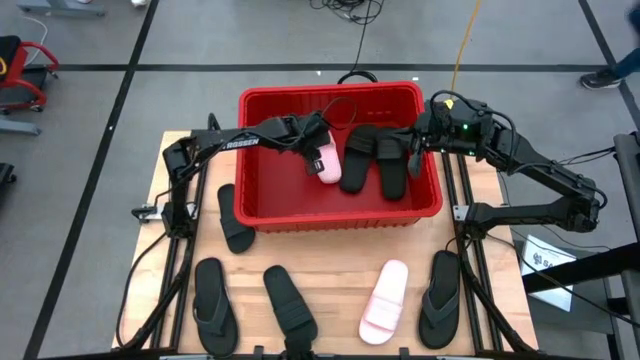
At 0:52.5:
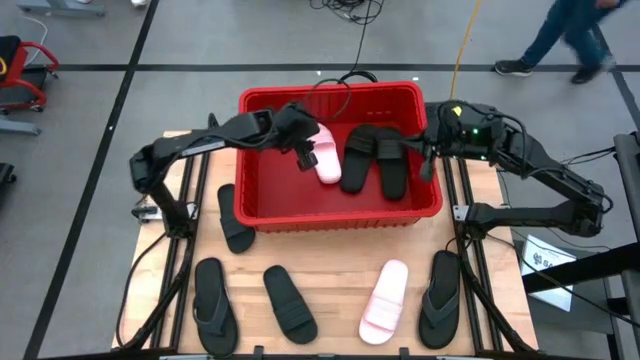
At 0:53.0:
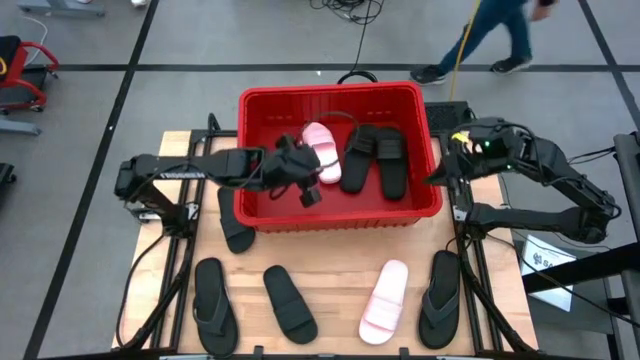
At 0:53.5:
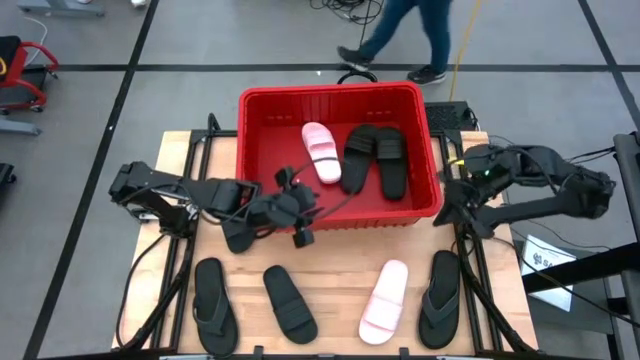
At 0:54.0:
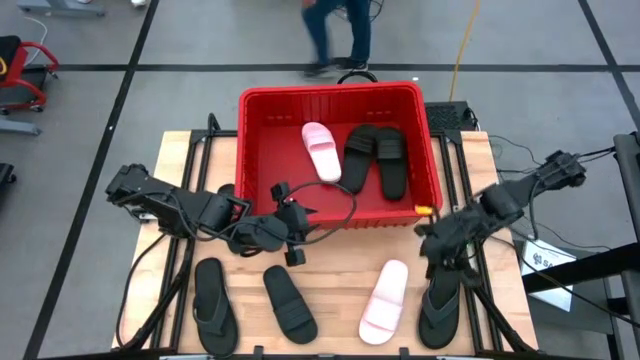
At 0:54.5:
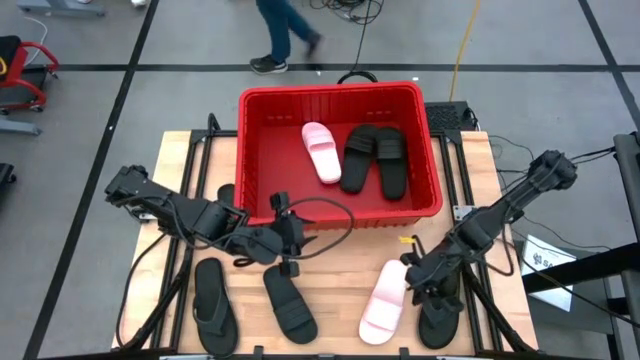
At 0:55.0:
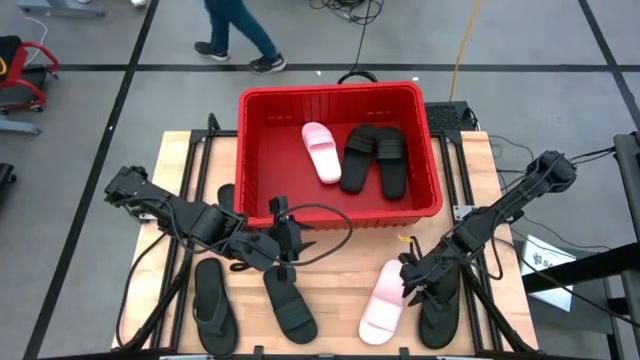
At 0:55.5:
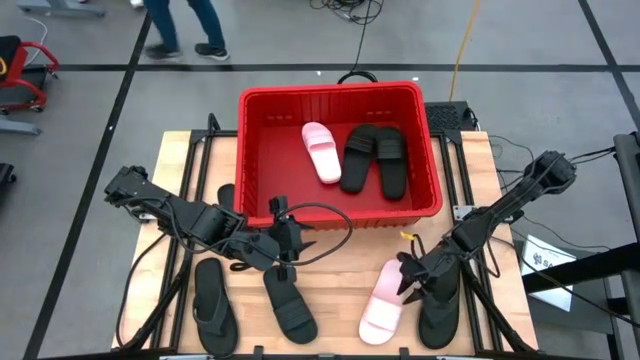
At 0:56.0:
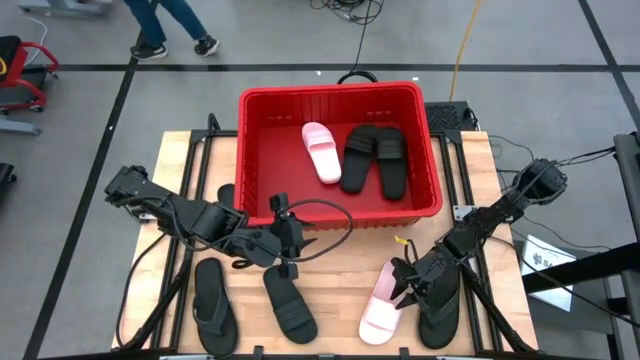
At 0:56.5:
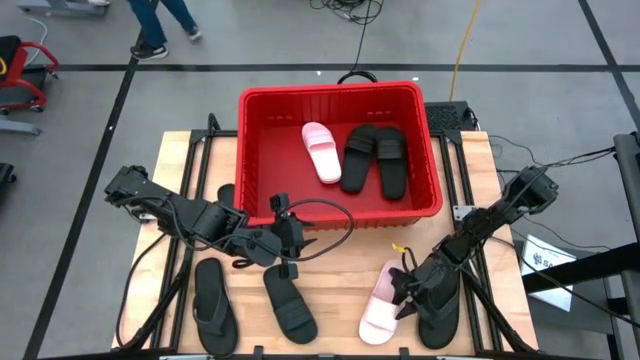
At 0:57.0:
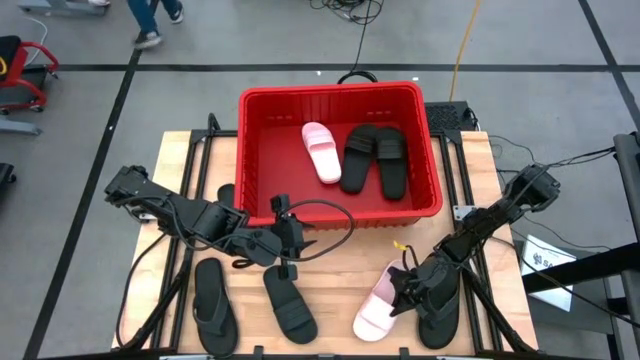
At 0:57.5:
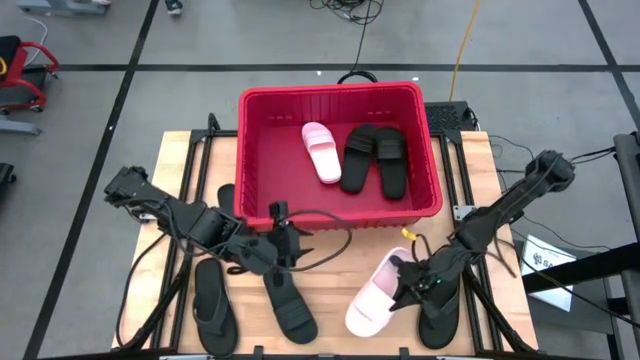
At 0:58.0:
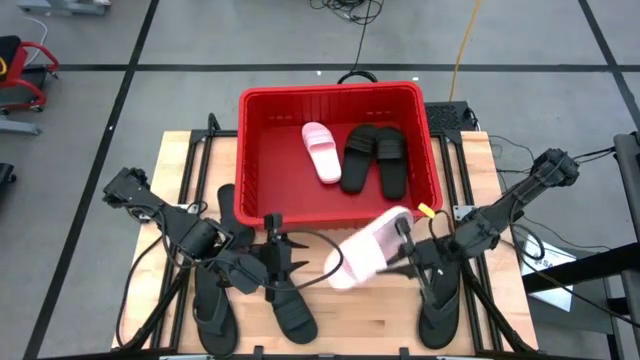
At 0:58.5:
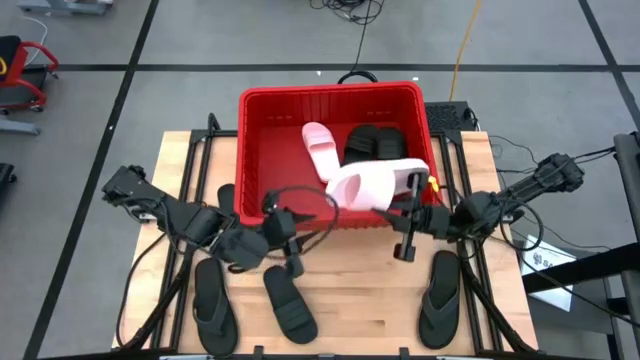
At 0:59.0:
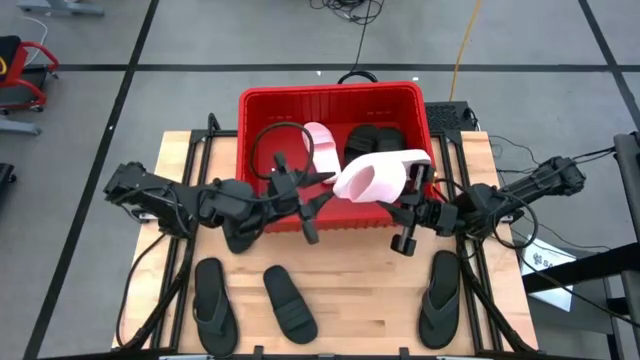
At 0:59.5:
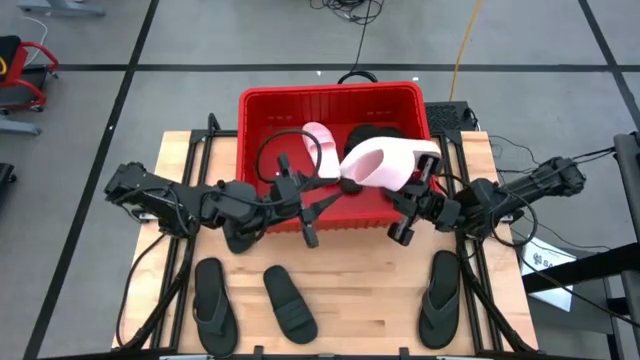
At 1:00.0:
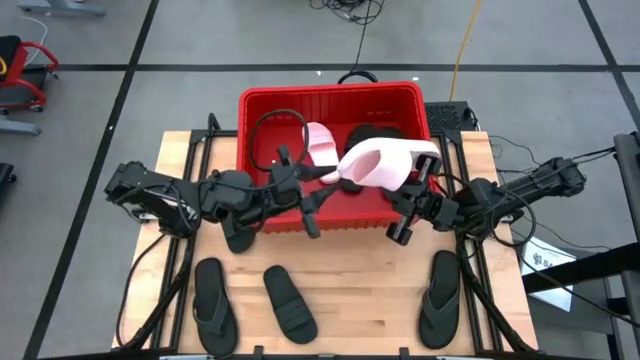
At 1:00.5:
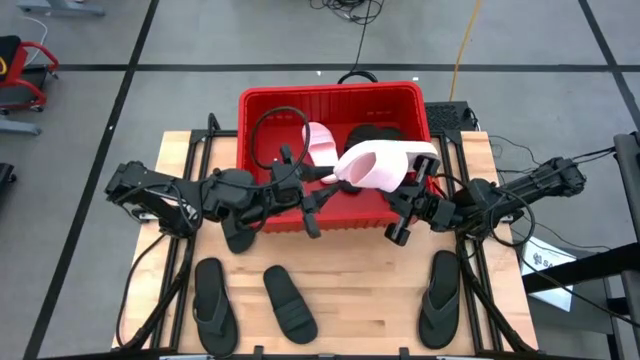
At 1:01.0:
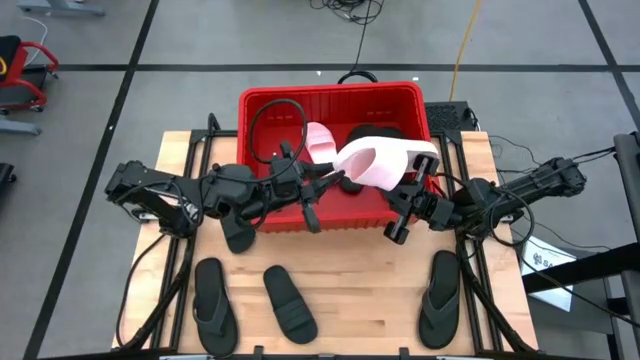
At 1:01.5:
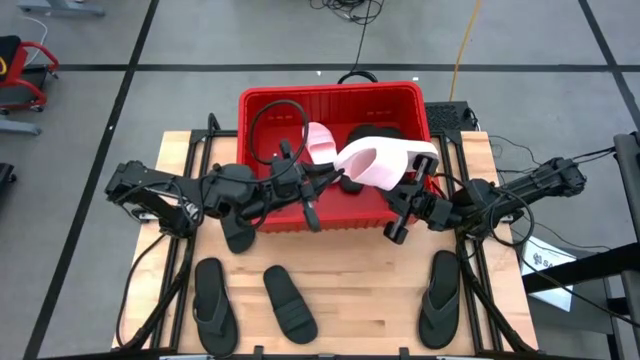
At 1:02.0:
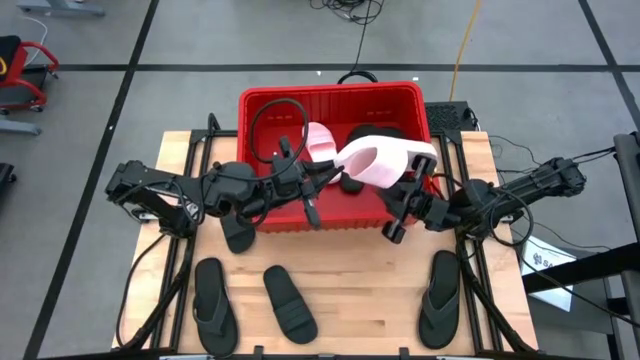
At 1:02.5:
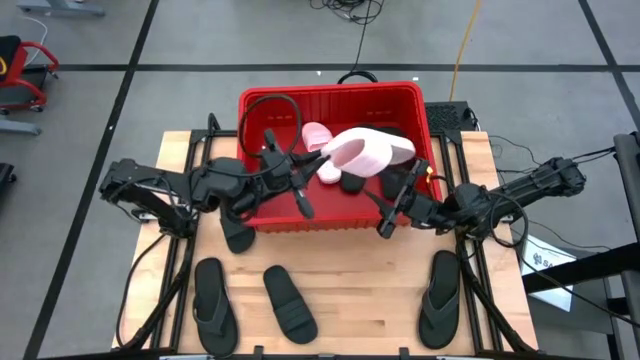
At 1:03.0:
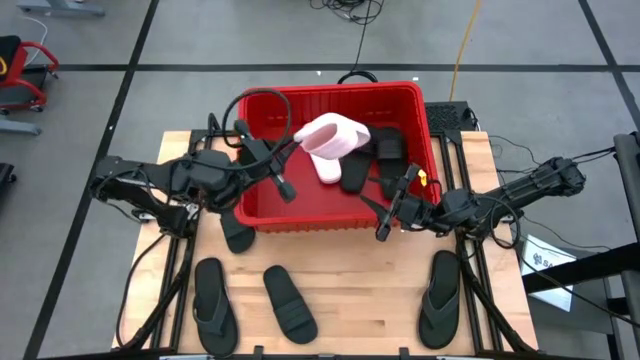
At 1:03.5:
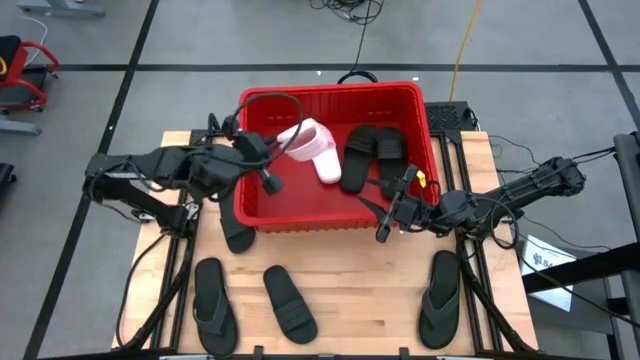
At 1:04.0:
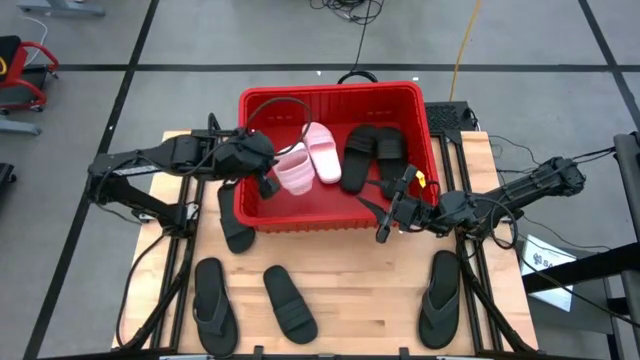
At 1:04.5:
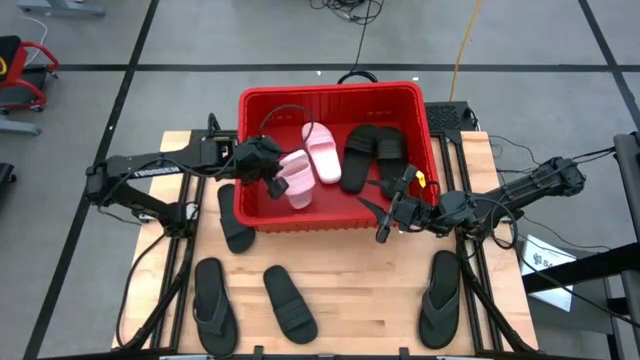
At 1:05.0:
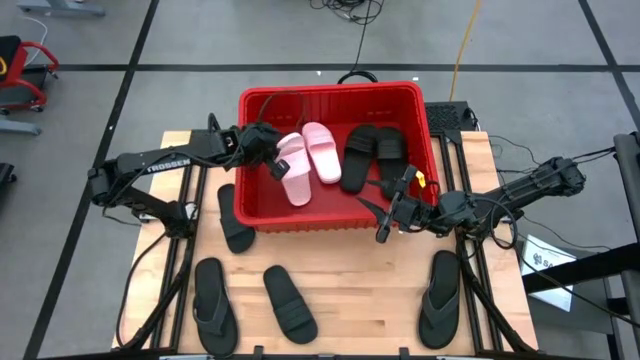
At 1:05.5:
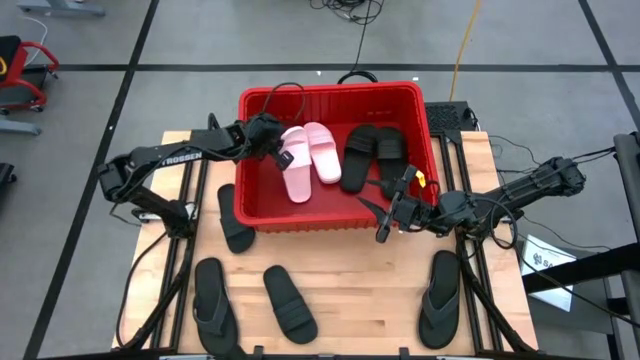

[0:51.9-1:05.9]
Task: Pick and place slides into bin
Put the pink slide into the red bin

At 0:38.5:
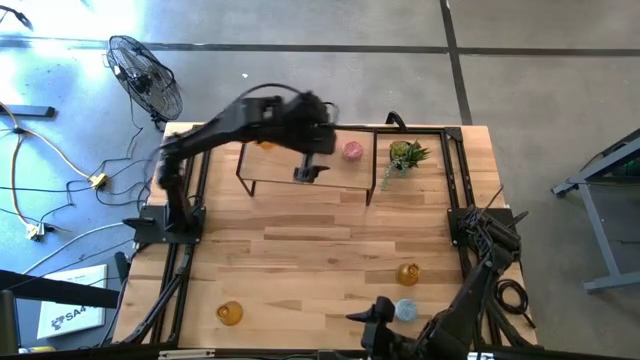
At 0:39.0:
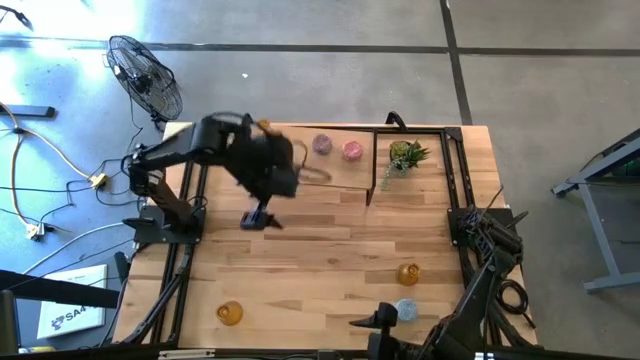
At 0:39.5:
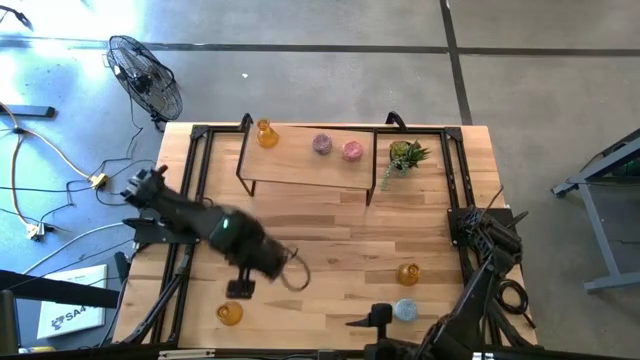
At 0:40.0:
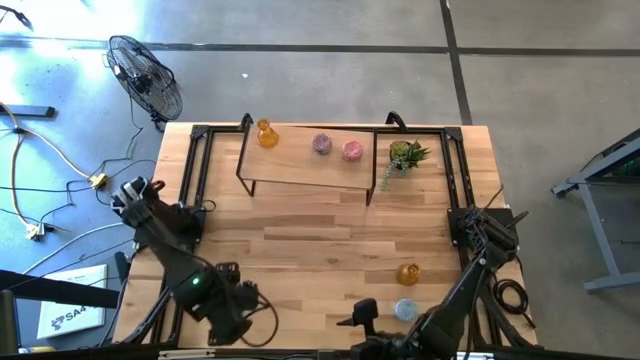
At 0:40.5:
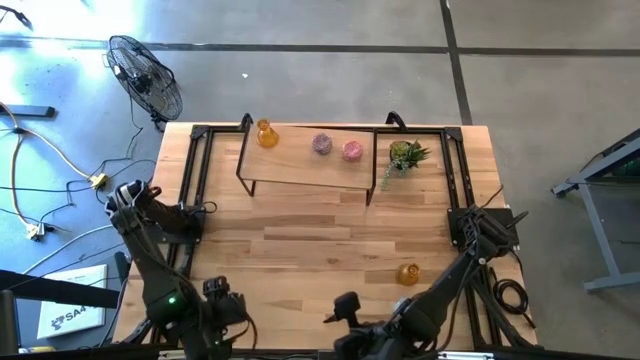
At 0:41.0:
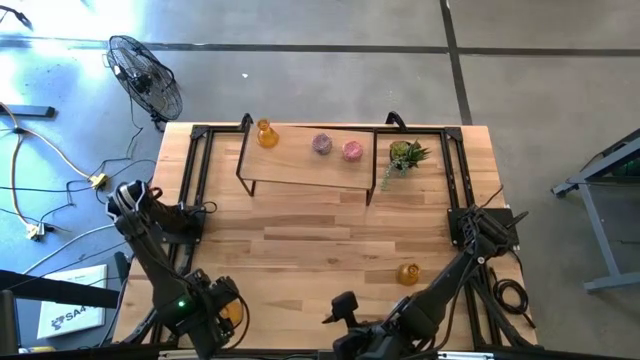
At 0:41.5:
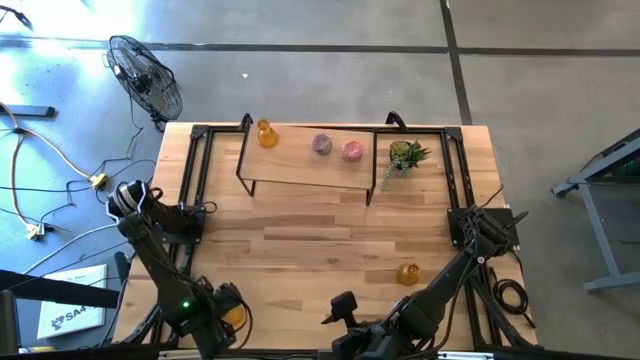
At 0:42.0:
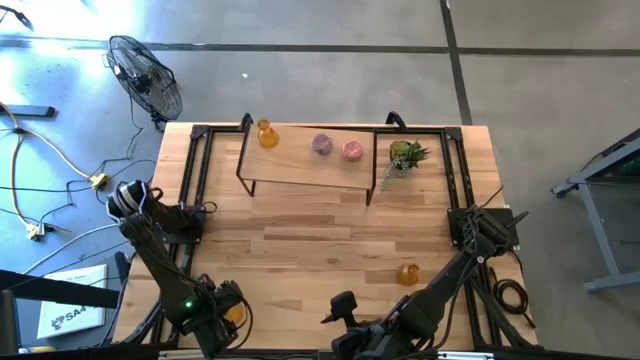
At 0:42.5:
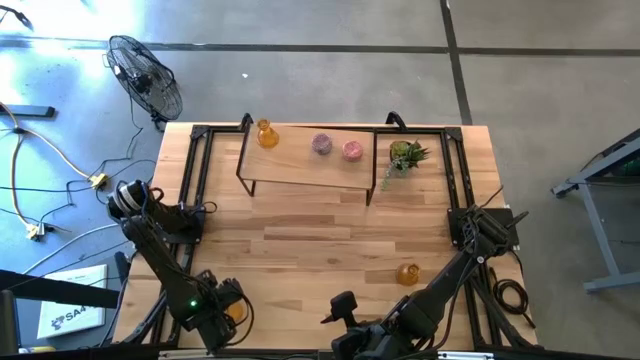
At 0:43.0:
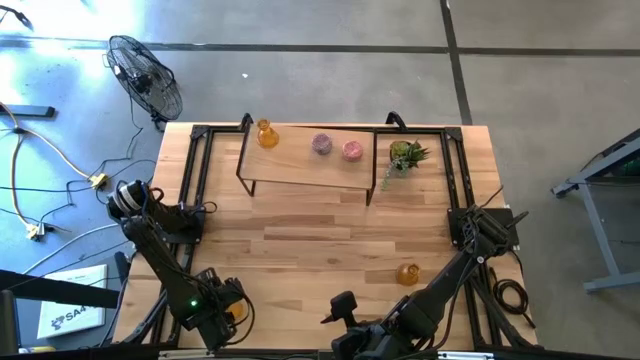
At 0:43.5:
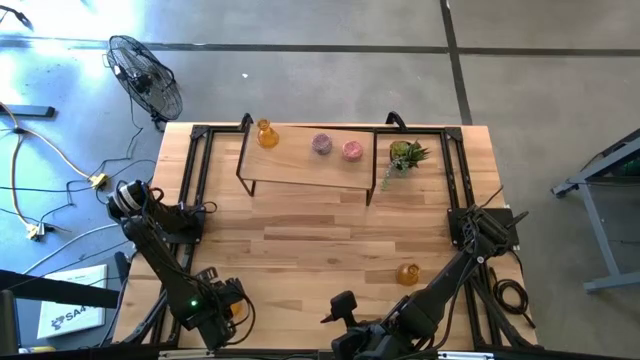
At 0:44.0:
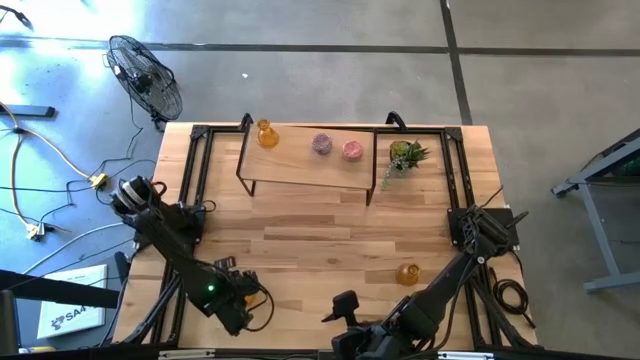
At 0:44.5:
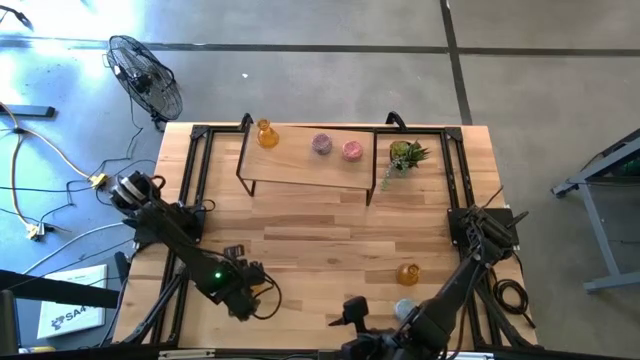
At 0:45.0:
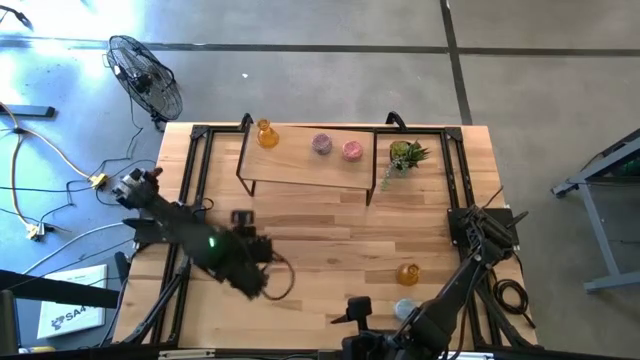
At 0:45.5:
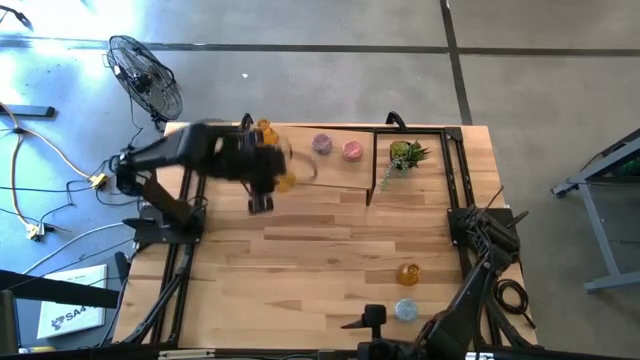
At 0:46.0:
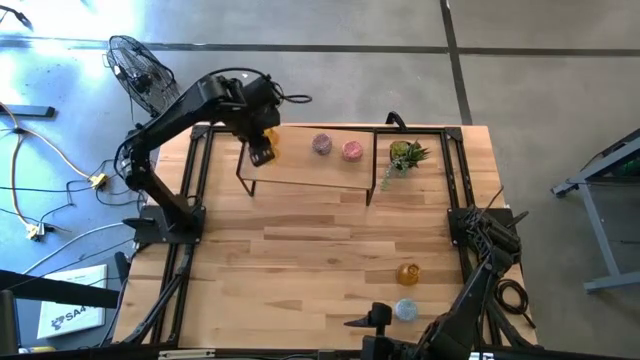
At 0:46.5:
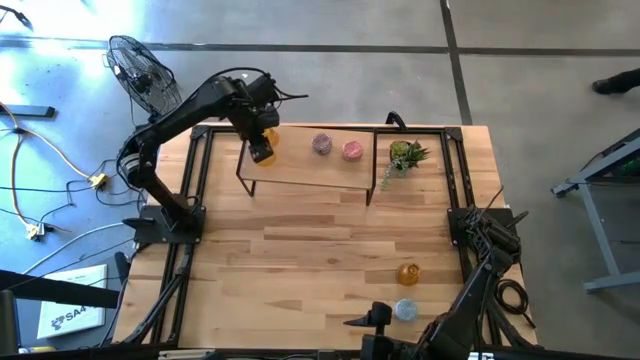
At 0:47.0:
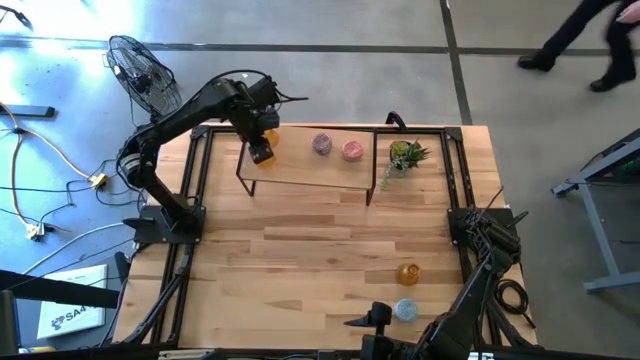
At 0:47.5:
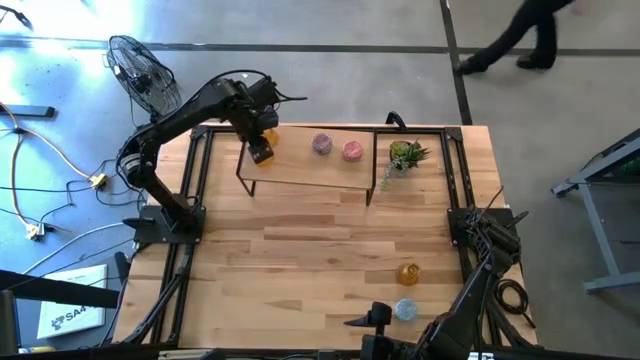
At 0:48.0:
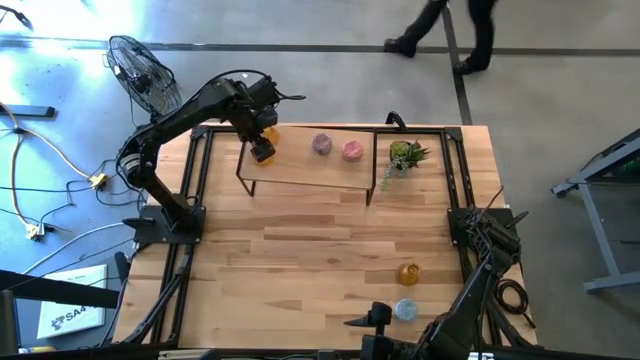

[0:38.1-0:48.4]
Task: Pick & Place candle stick holders
Put the left yellow glass candle holder on the shelf
